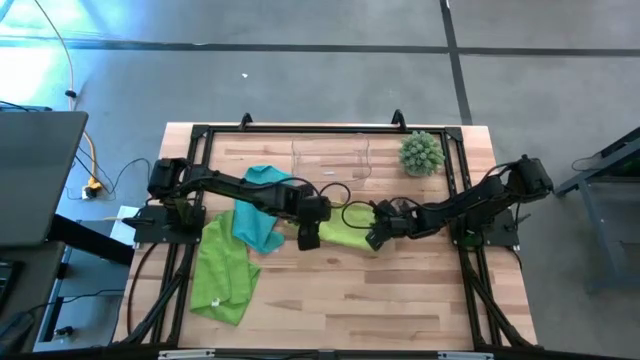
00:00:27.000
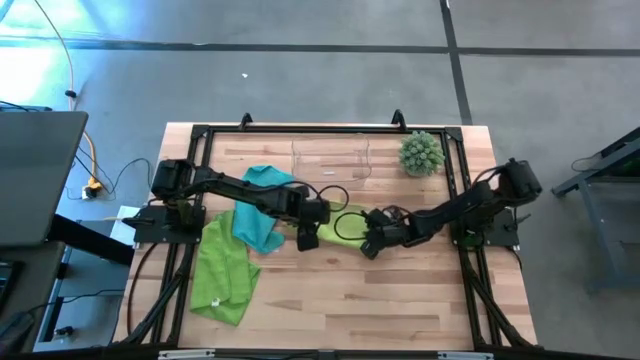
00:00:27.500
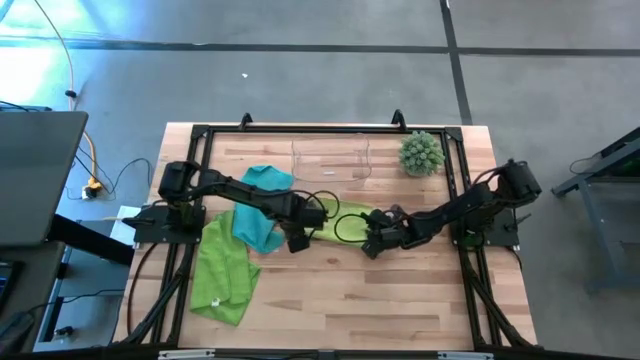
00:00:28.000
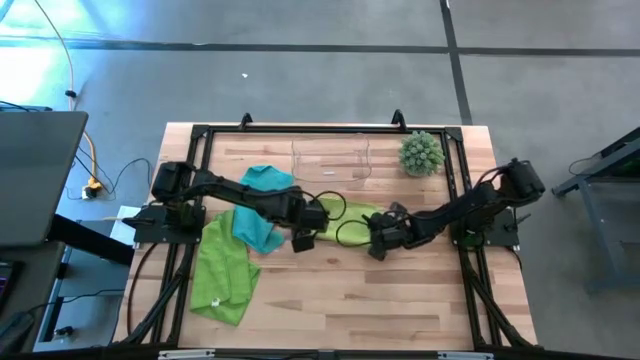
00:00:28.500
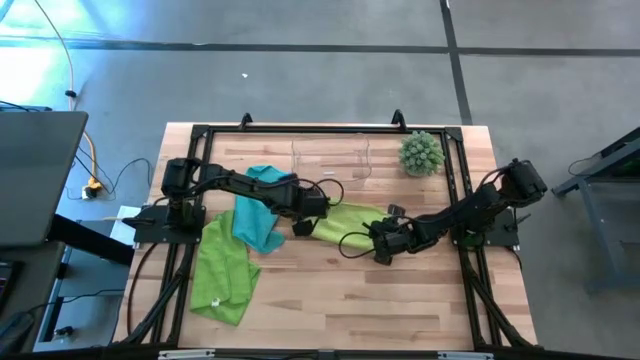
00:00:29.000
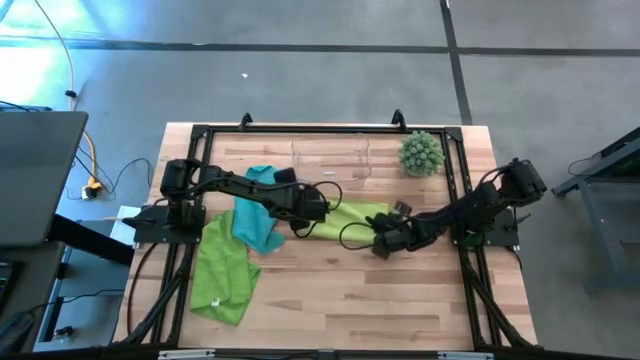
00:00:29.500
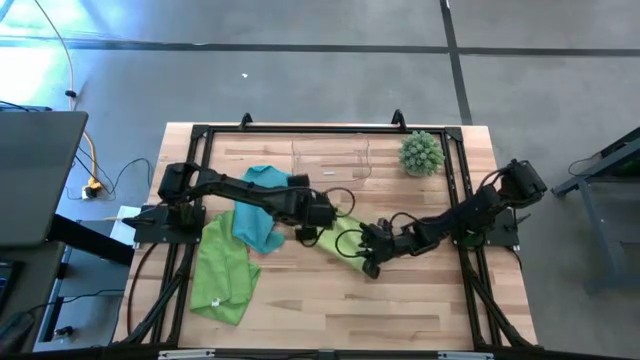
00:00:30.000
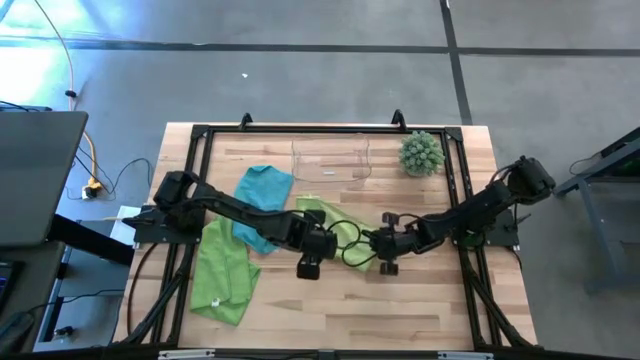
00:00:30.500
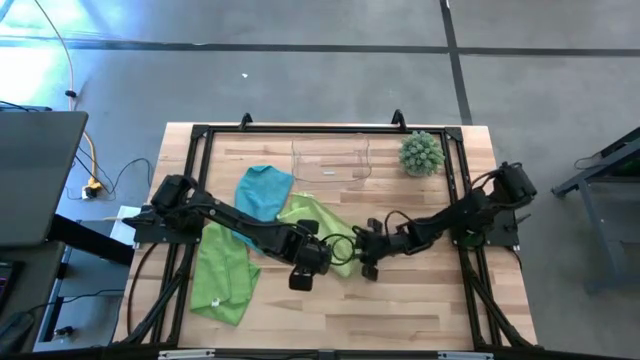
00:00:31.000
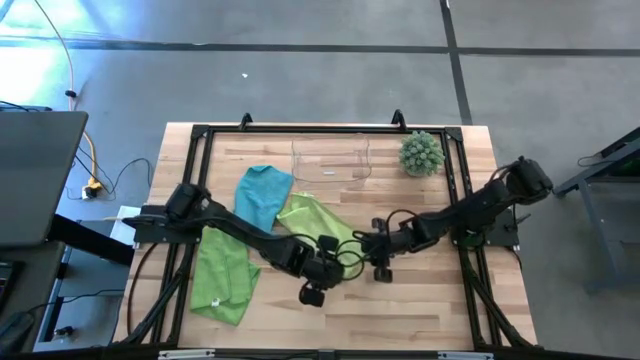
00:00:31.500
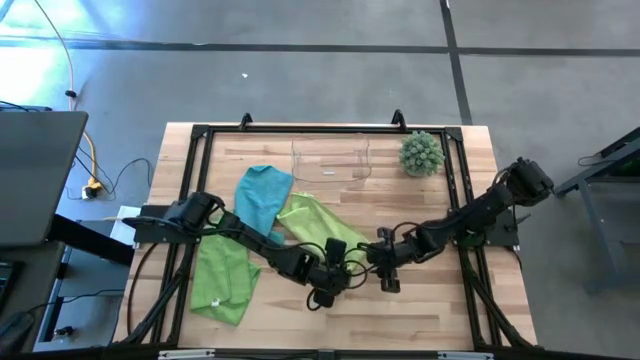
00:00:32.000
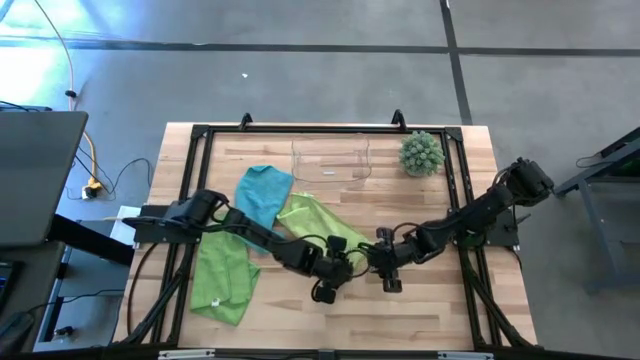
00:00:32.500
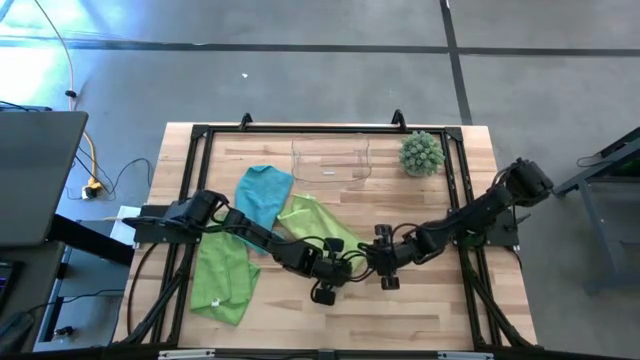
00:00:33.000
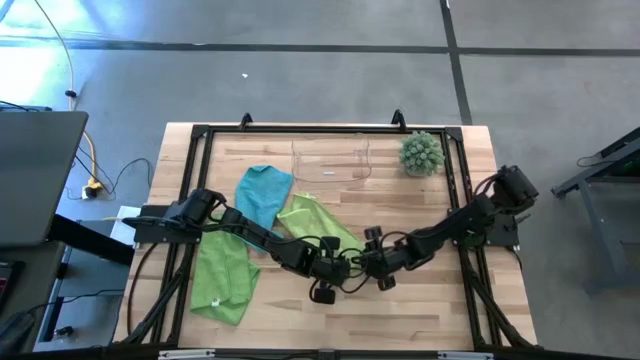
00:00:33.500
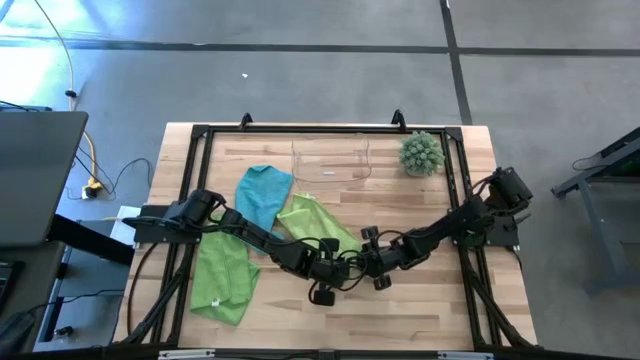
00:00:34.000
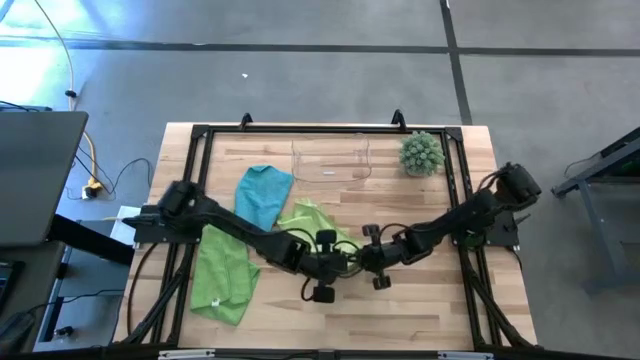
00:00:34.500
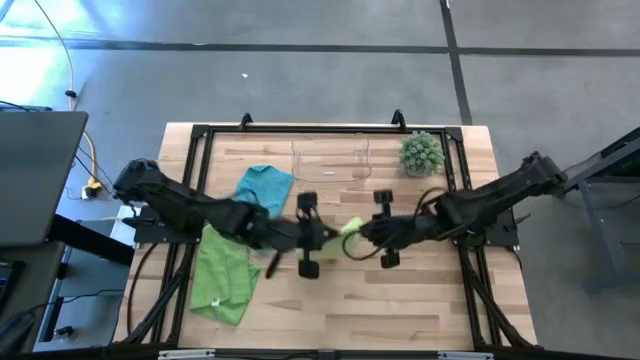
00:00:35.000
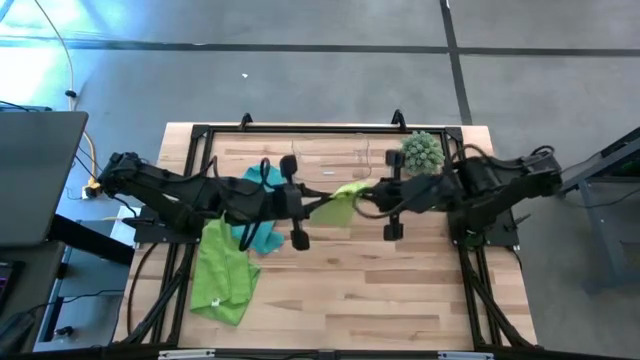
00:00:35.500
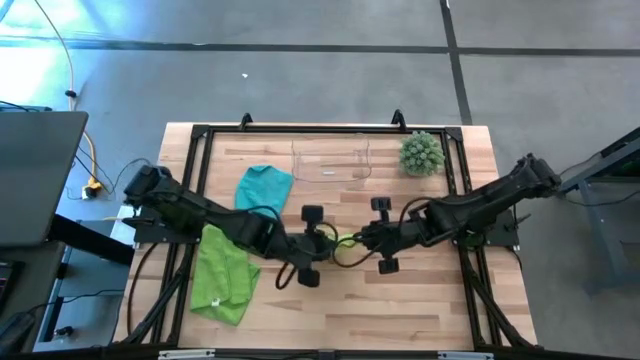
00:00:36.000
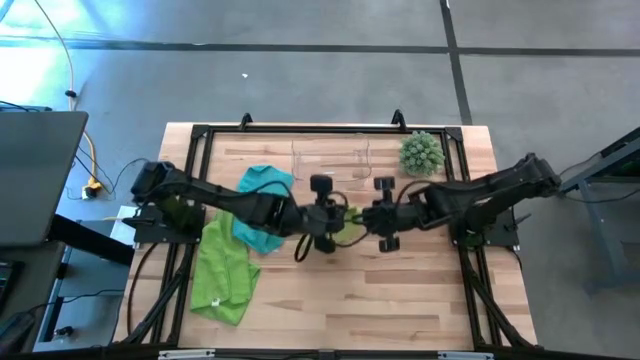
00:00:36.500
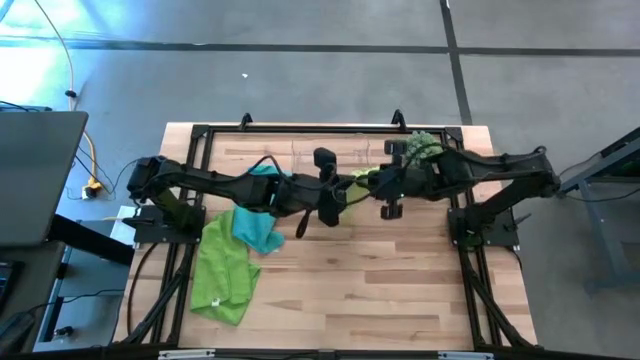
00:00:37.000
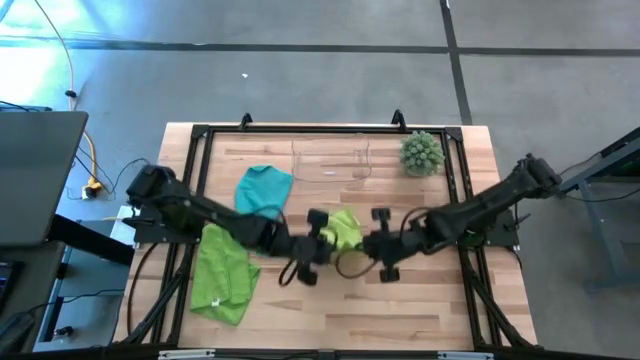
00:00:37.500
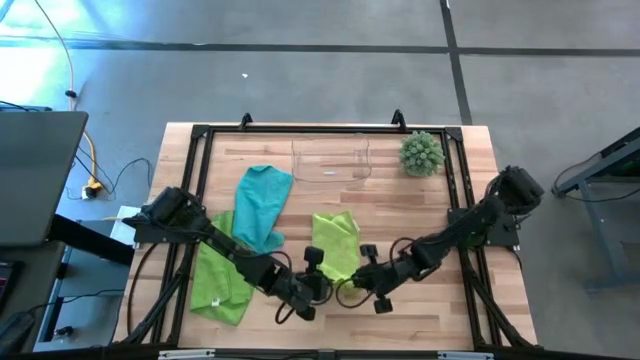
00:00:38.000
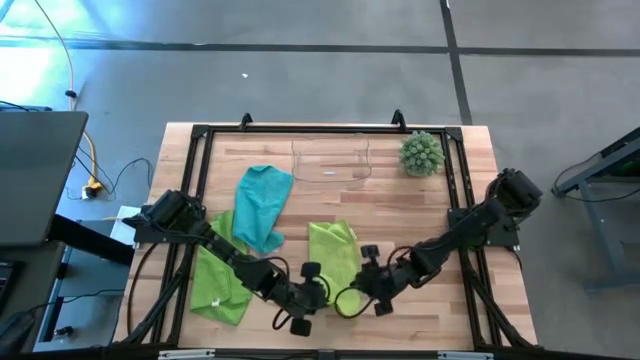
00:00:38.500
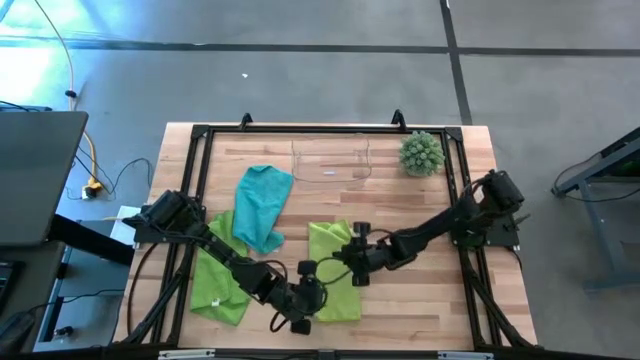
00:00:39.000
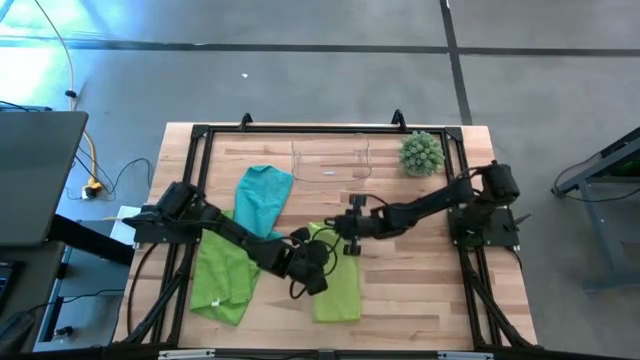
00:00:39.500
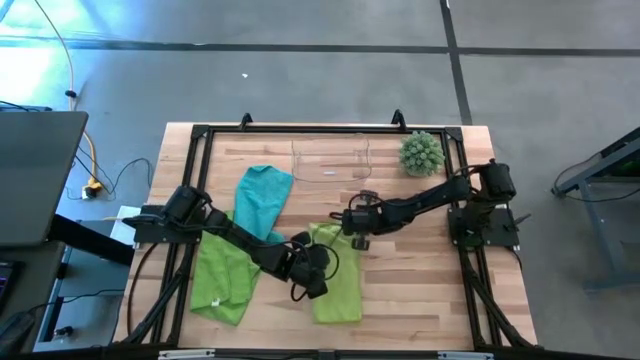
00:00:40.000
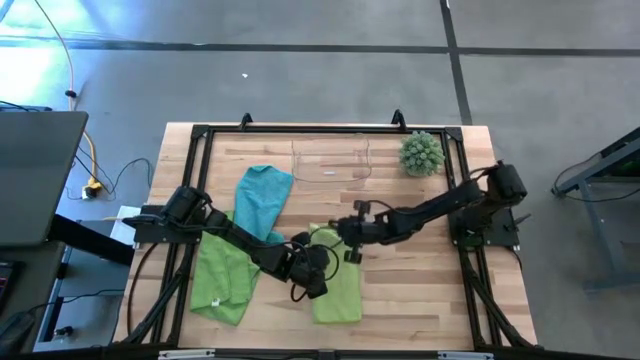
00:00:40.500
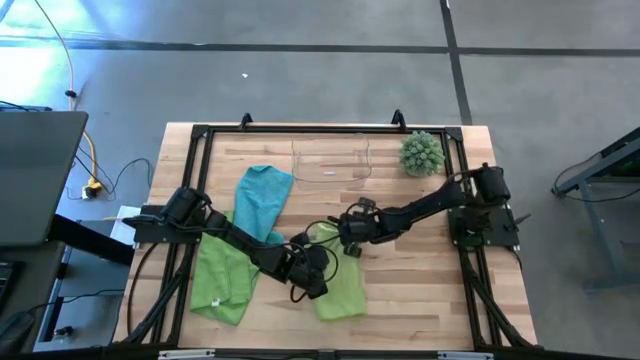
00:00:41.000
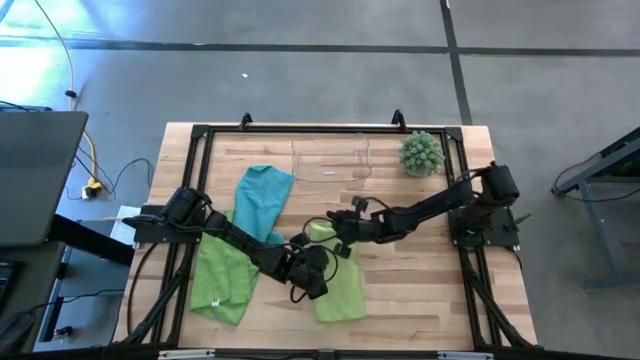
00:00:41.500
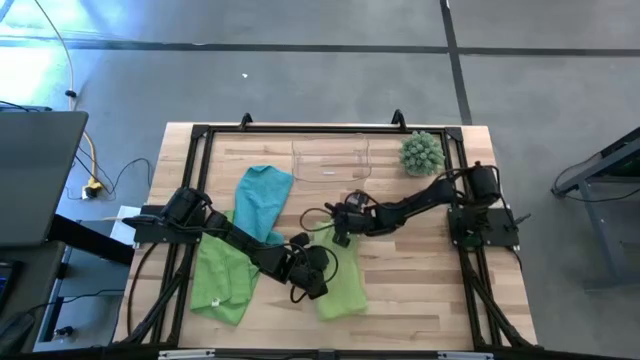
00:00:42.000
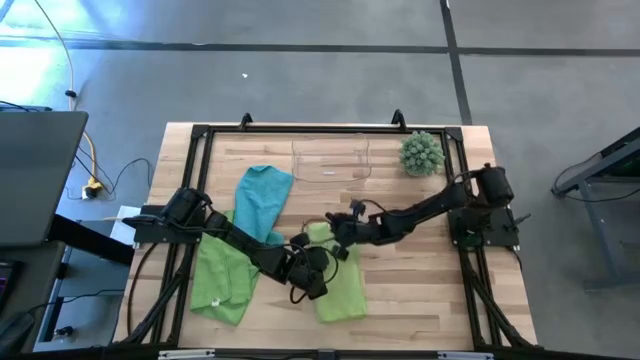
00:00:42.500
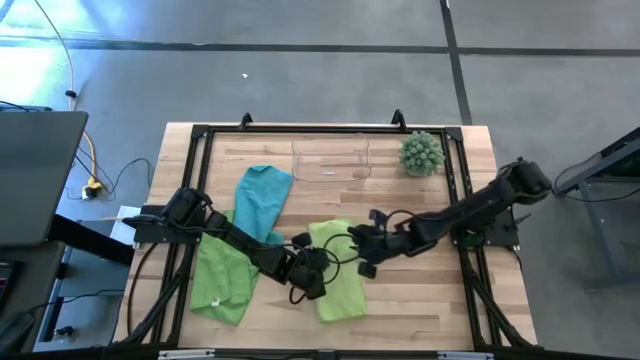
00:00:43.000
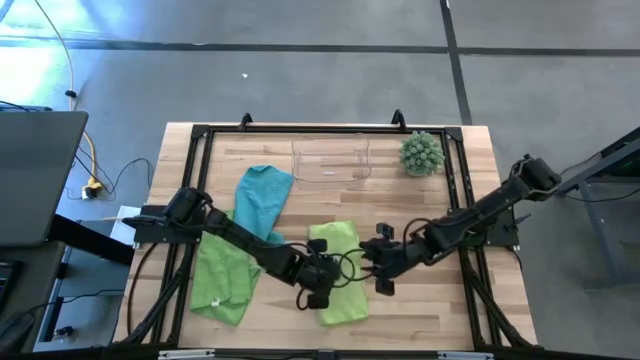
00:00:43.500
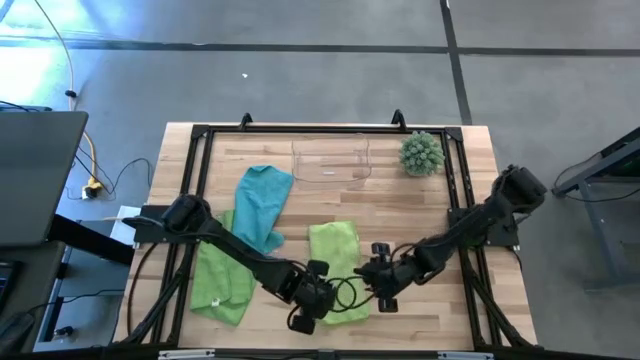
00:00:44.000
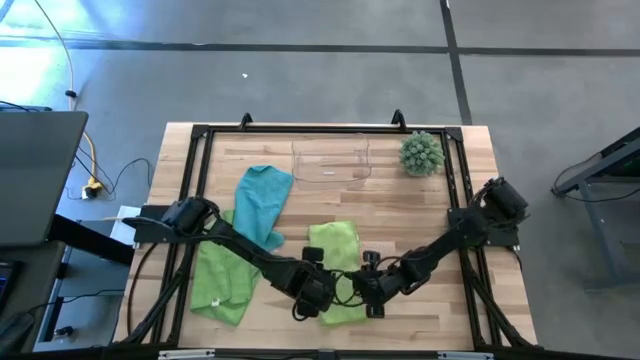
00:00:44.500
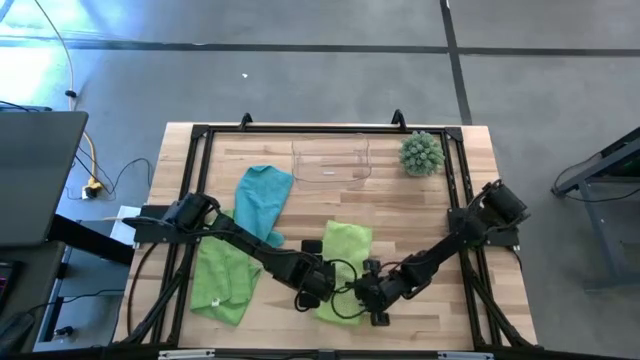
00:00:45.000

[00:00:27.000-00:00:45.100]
Task: Roll microfiber towels into tight, uniform cylinder then place into a basket
Roll the light green microfiber cloth

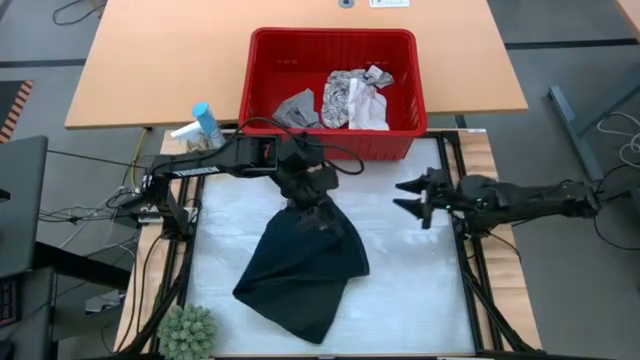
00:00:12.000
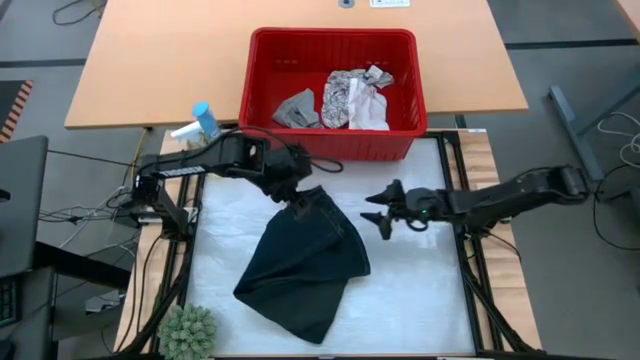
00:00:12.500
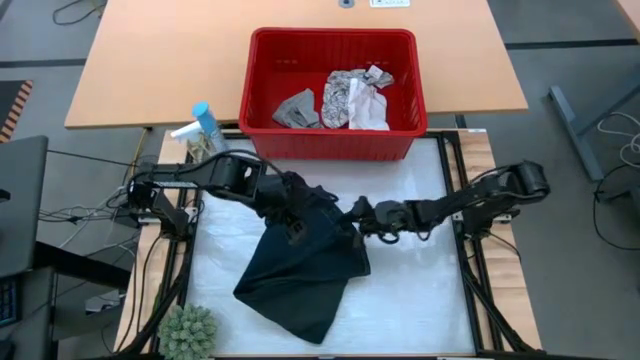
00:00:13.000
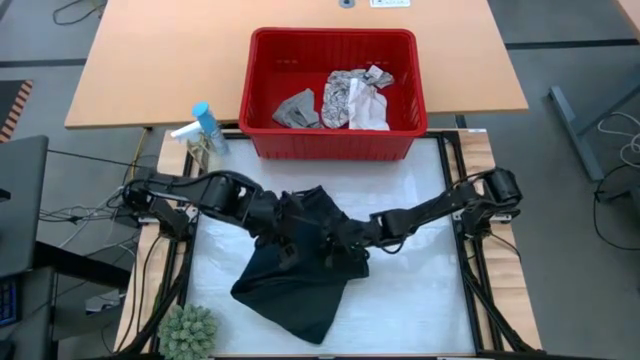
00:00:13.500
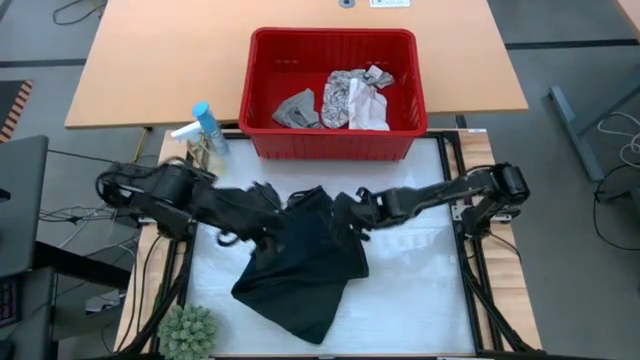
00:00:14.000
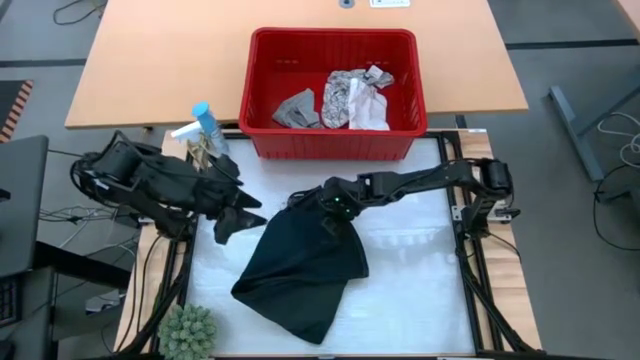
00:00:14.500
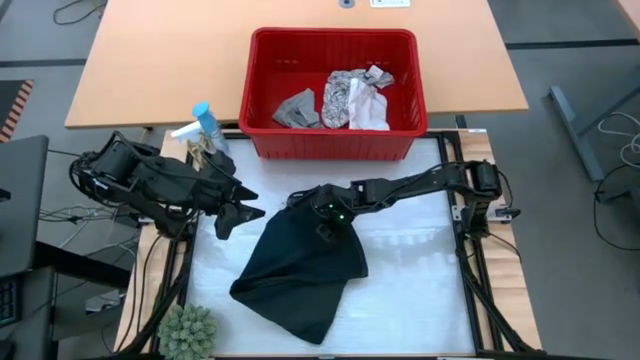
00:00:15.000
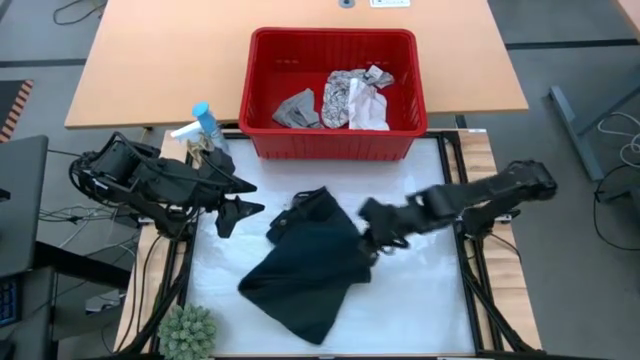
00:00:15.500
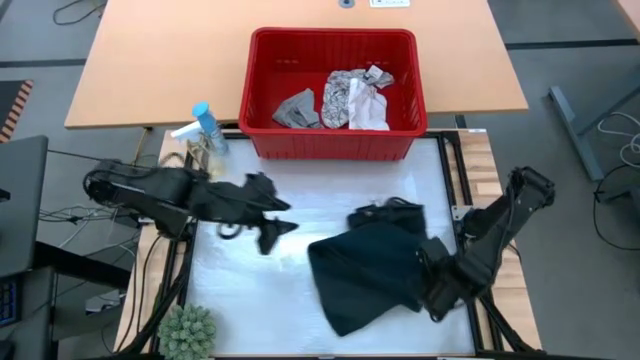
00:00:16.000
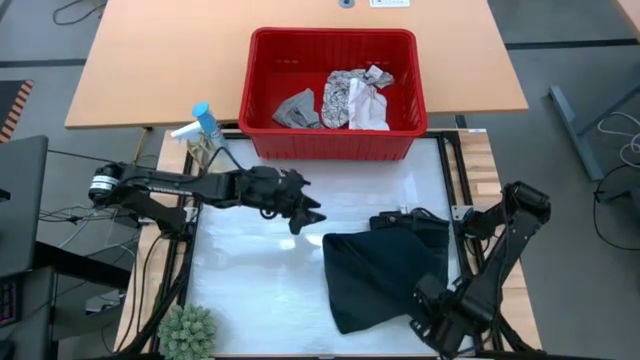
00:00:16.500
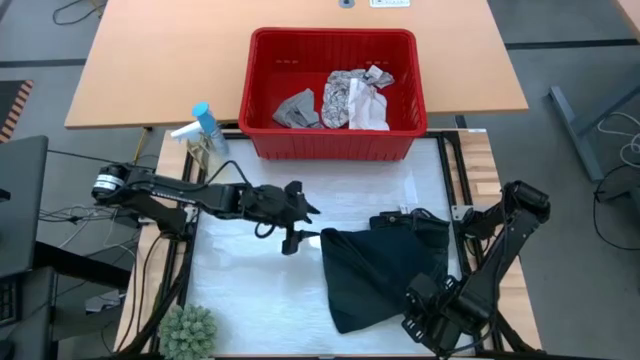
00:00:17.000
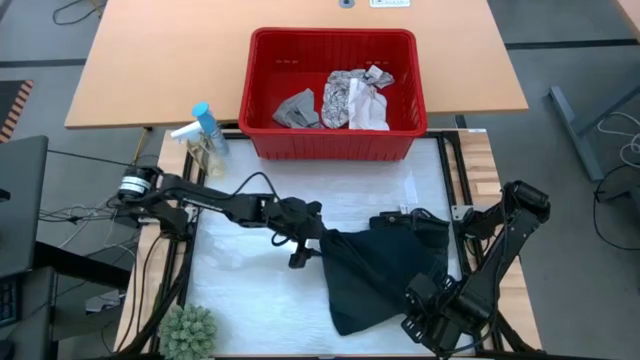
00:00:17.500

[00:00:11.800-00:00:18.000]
Task: Fold Laundry from Bin
Fold the blue pants from the red laundry bin
